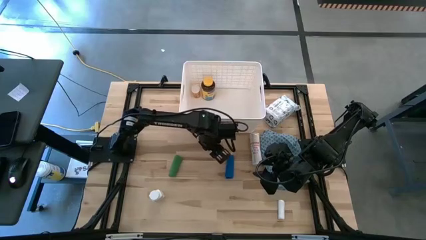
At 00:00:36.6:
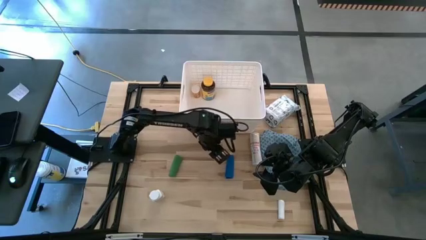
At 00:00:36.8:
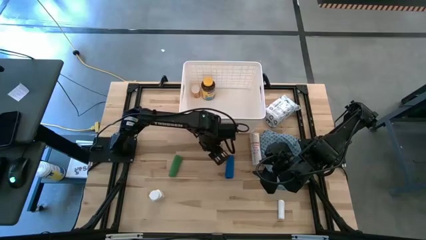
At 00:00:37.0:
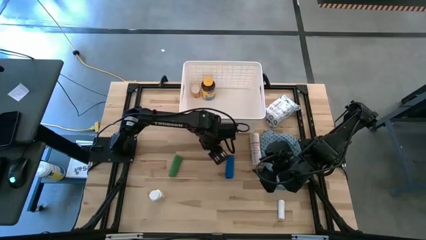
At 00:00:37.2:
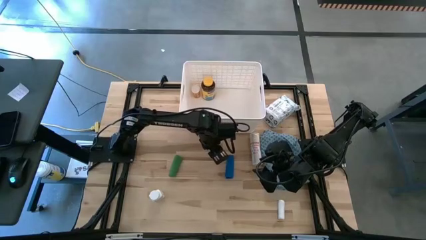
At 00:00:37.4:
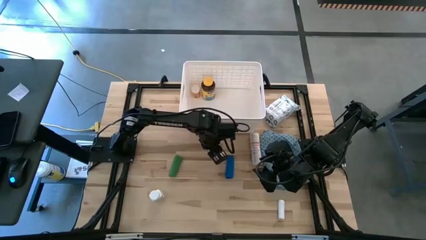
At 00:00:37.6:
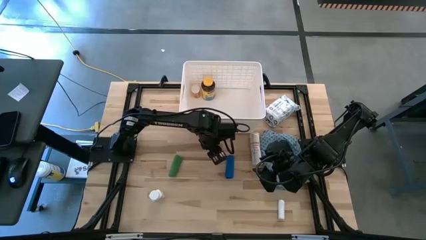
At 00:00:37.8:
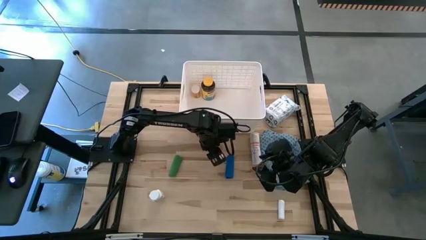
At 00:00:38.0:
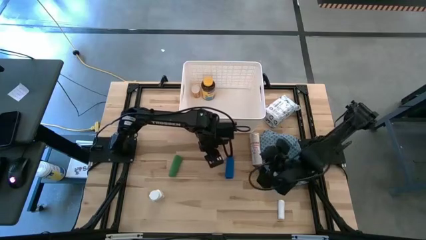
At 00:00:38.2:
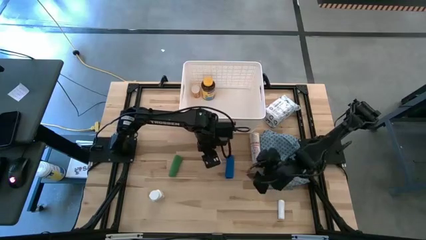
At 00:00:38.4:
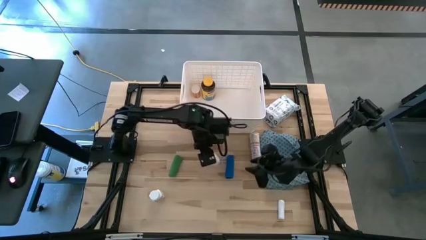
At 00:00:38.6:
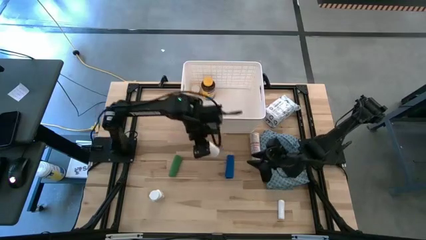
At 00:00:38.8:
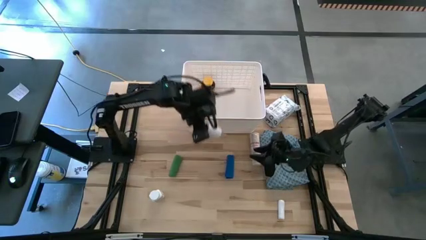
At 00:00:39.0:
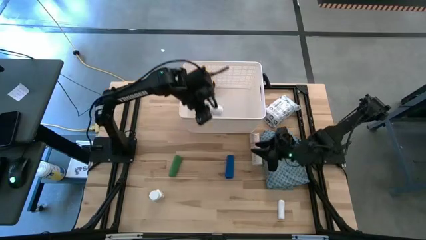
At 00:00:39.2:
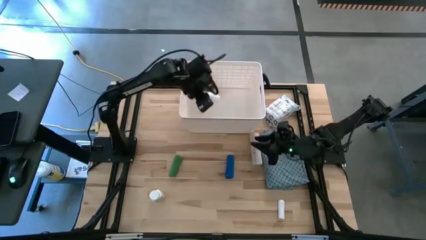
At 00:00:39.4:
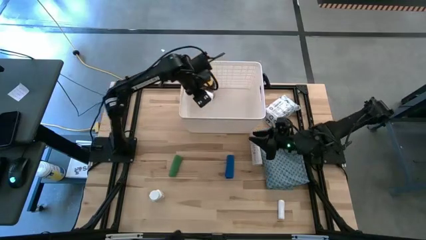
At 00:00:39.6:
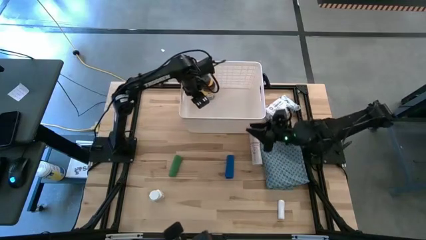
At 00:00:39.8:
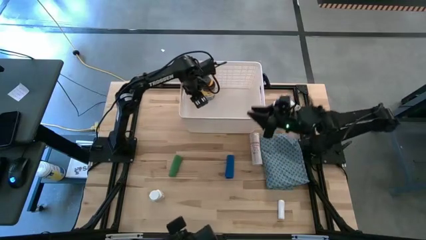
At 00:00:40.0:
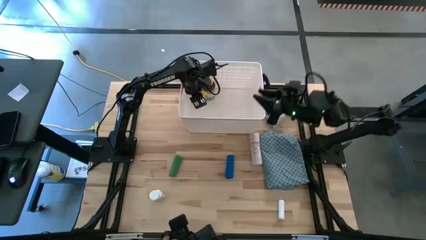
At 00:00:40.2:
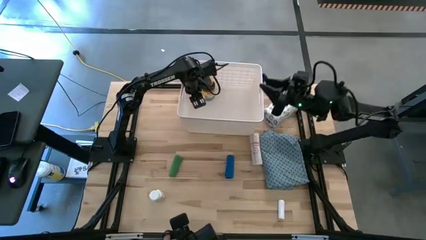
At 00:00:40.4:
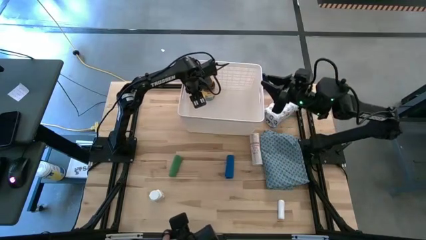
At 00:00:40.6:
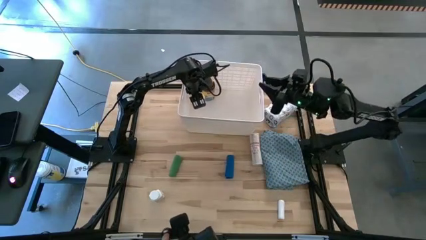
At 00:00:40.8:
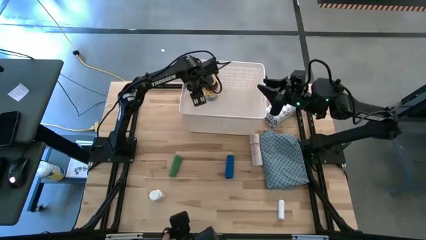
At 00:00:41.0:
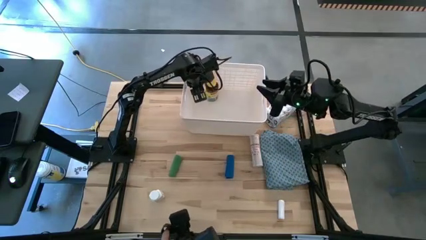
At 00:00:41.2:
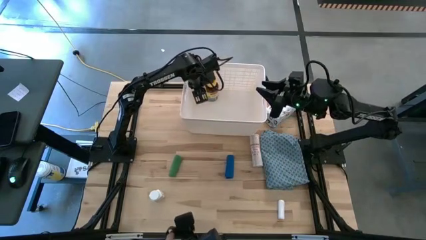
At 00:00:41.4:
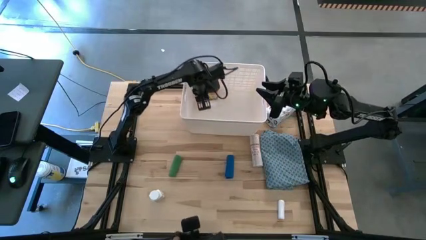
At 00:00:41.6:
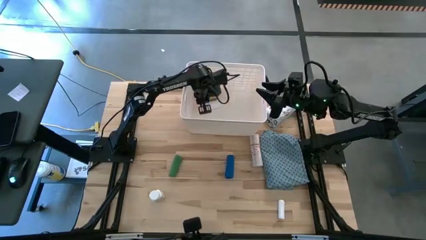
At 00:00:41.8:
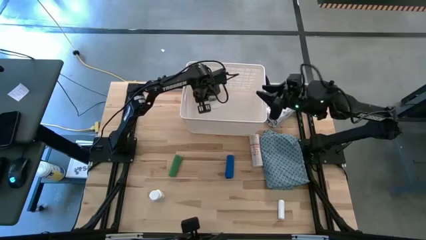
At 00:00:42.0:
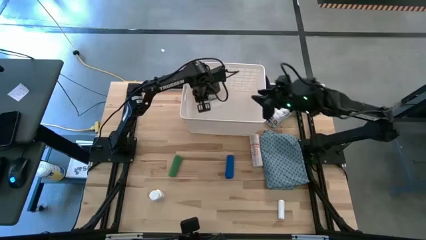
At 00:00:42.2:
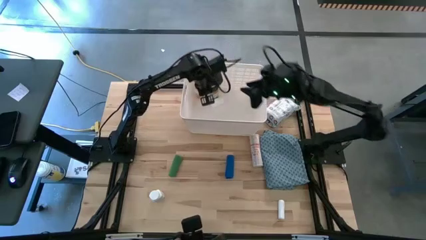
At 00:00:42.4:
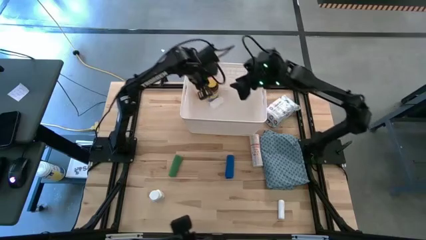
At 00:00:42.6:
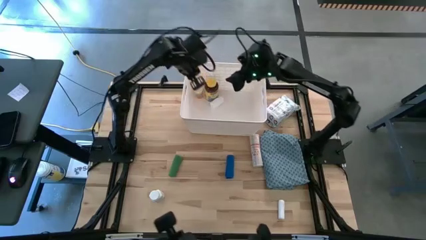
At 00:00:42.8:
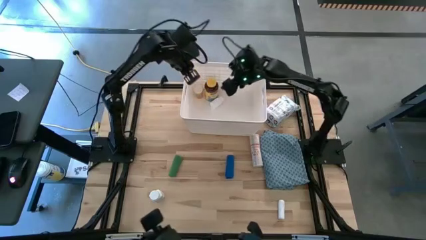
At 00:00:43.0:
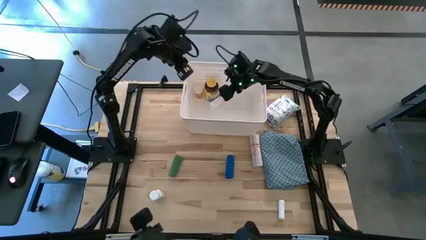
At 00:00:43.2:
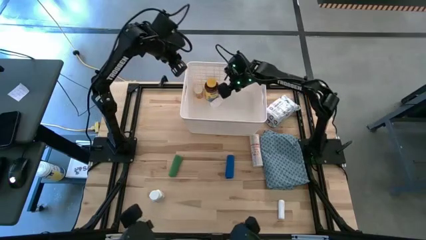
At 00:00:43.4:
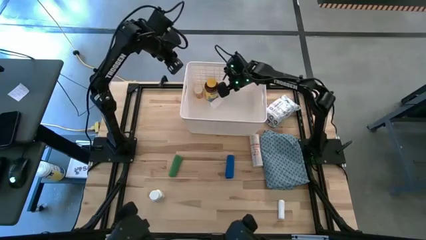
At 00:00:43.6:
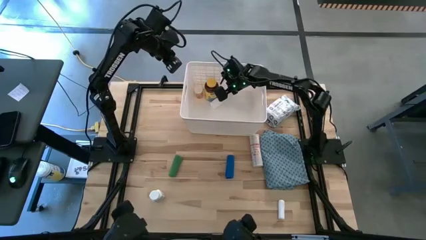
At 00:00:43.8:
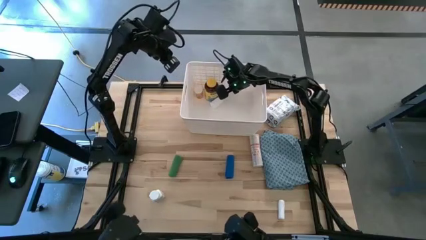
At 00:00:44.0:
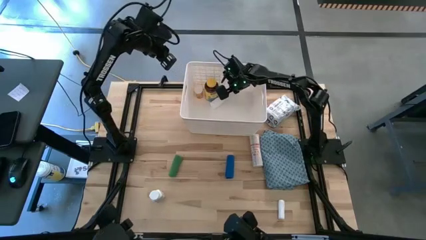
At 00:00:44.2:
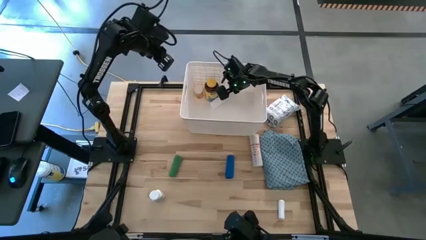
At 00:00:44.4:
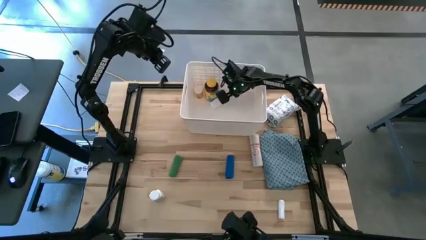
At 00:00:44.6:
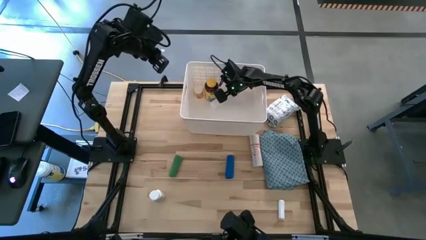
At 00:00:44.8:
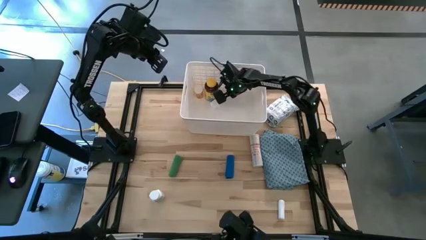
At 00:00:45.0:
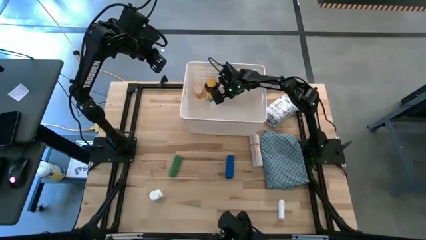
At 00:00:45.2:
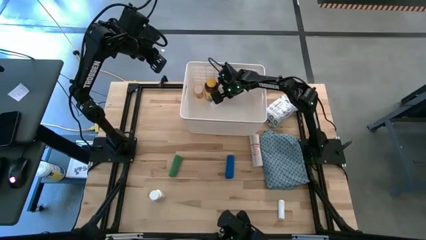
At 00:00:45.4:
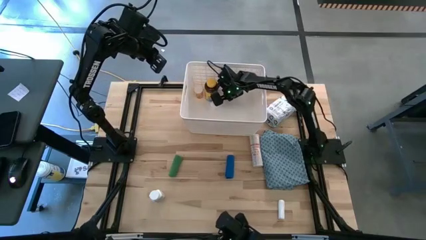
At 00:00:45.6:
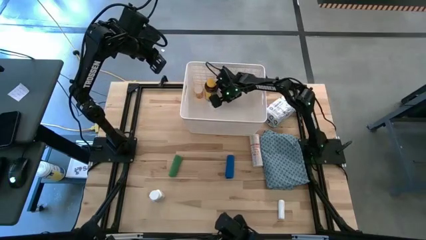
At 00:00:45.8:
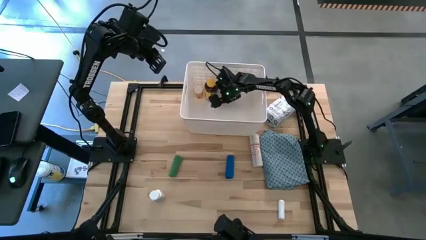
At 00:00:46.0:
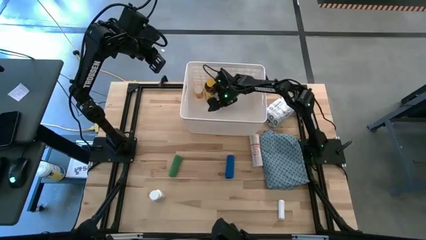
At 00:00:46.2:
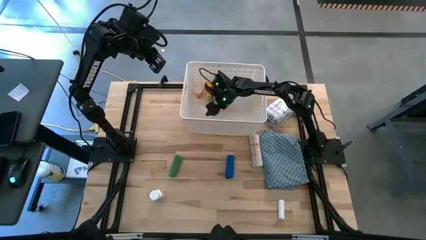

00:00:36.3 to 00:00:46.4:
Task: Pick & place medical supplies in basket/bin
Put the white medicine bottle into the white bin

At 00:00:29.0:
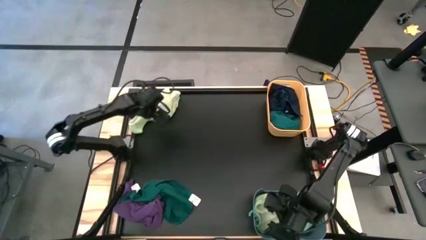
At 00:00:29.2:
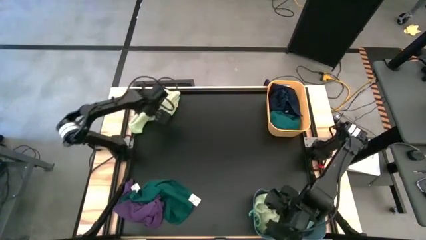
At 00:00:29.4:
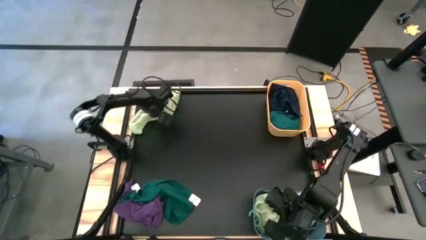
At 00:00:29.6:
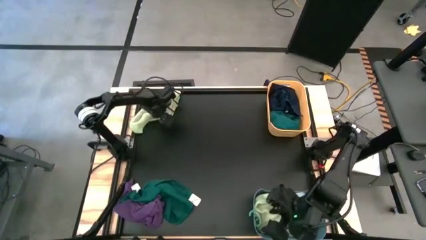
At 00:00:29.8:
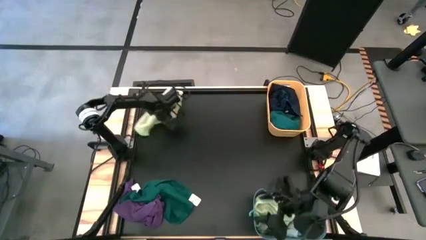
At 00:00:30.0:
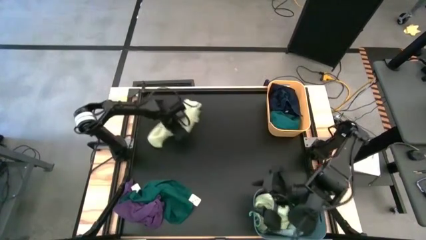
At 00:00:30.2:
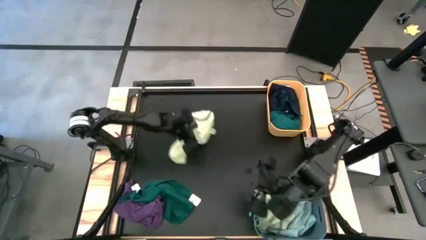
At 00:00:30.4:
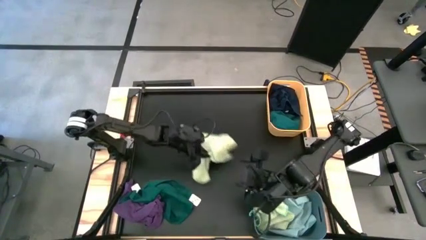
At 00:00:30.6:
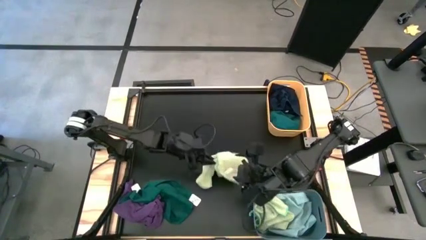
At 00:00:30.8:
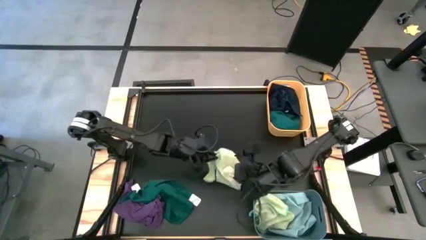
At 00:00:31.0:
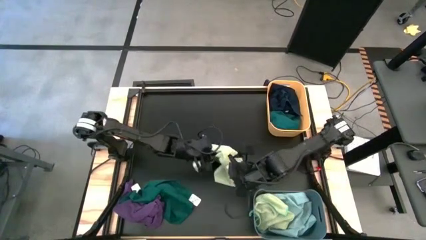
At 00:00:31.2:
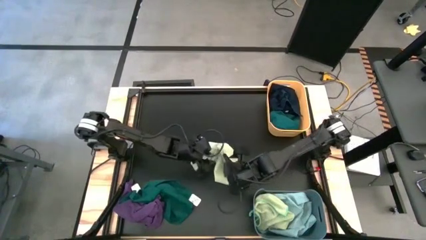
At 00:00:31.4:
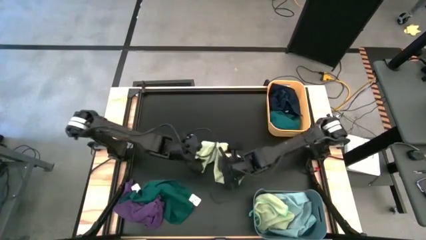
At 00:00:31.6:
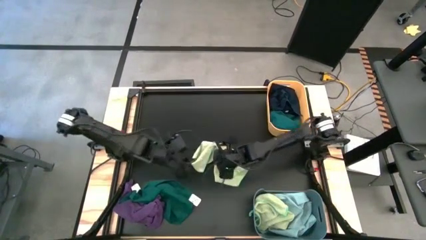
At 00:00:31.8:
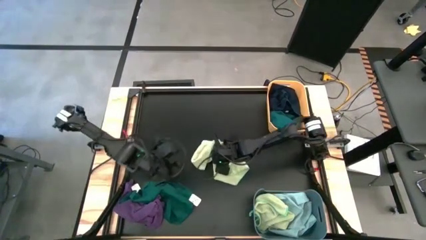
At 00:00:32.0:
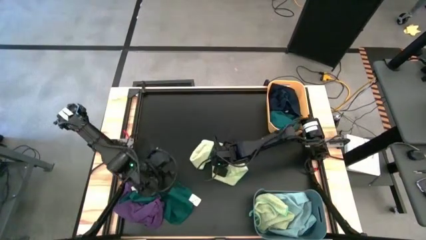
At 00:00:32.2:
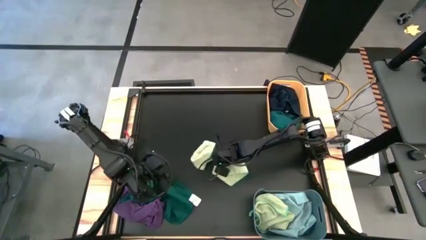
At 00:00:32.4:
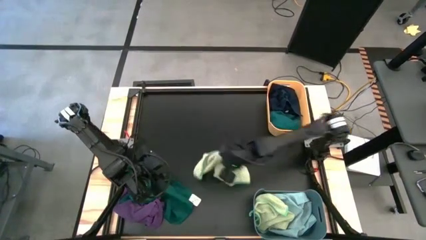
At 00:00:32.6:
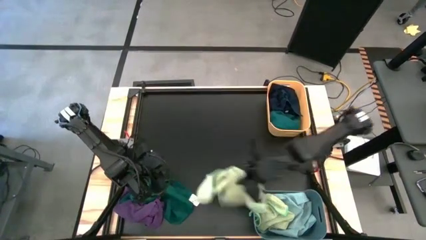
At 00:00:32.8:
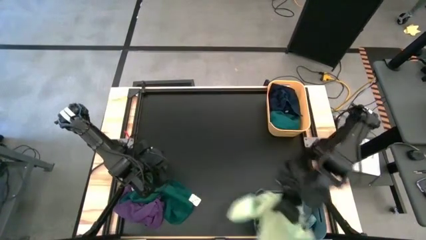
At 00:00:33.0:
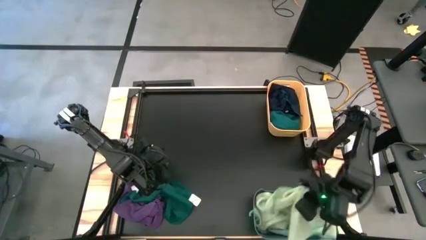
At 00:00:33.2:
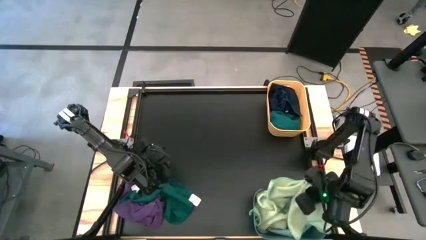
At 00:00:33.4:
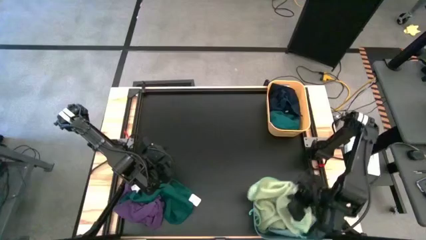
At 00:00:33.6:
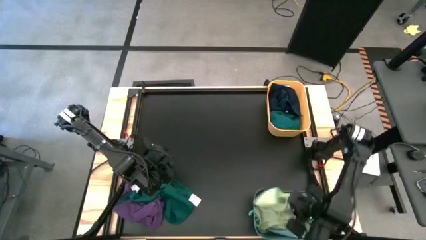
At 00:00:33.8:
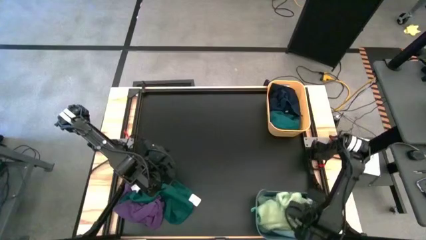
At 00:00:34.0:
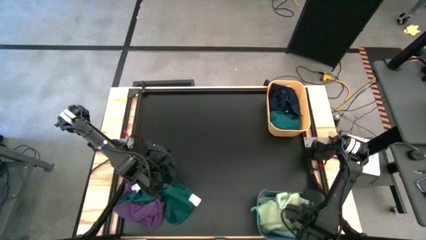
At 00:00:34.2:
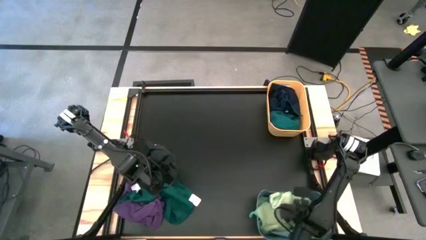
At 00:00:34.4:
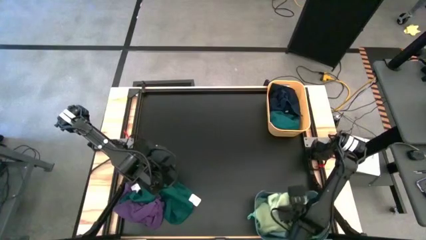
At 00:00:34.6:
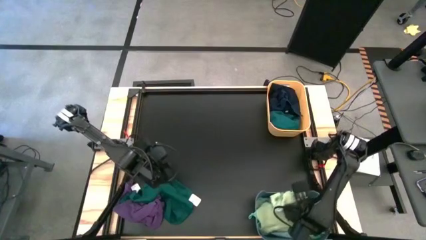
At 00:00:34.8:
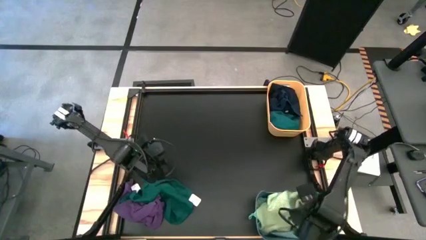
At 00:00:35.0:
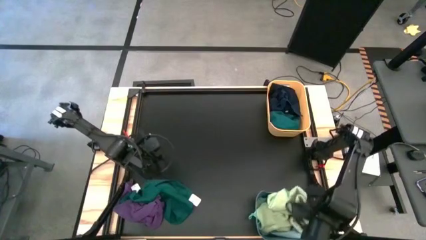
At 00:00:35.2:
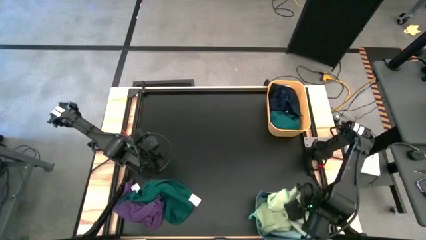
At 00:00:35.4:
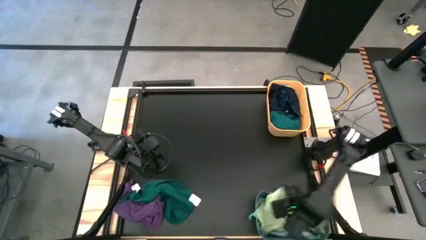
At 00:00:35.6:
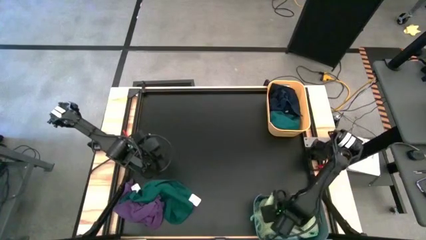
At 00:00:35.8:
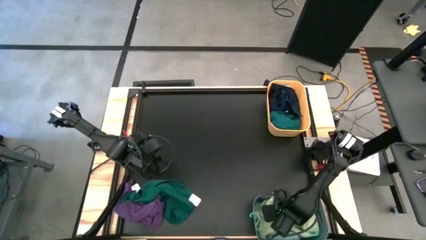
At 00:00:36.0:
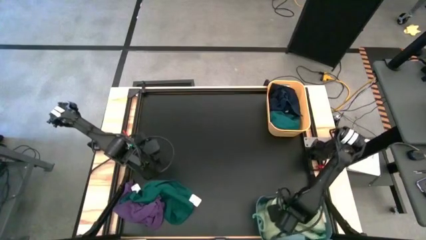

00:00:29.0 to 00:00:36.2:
Task: Sort towels by color in basket
Put the light green towel into the blue bin
